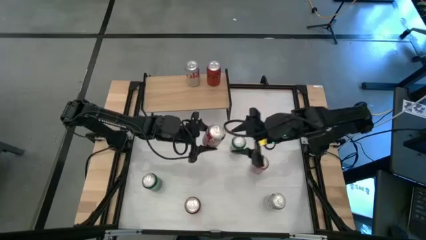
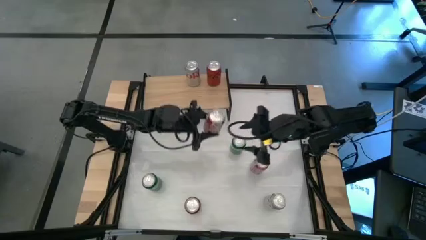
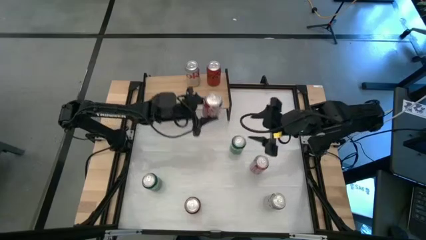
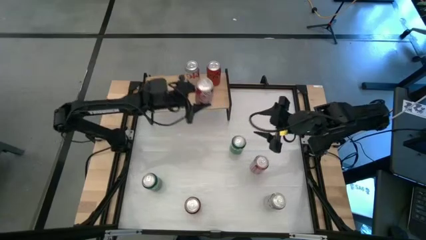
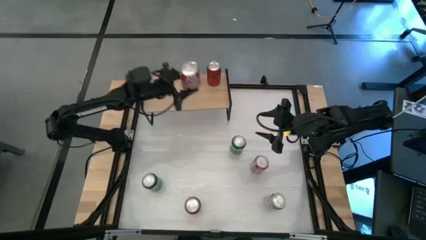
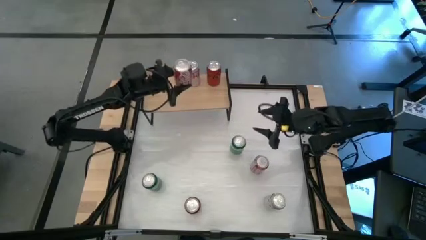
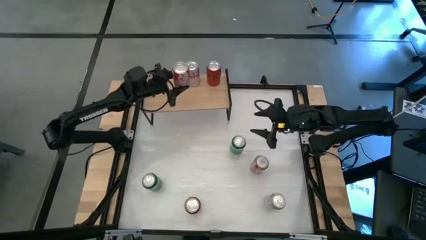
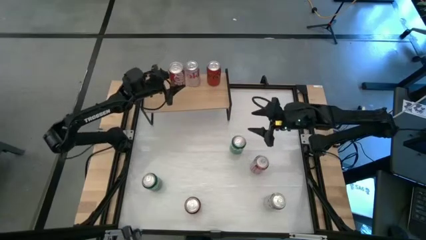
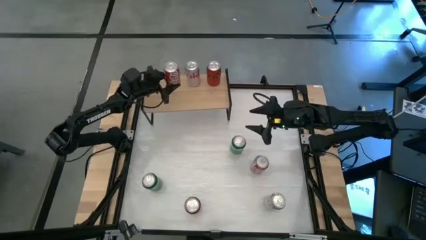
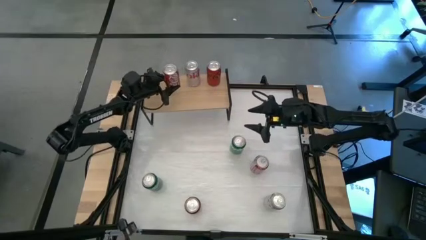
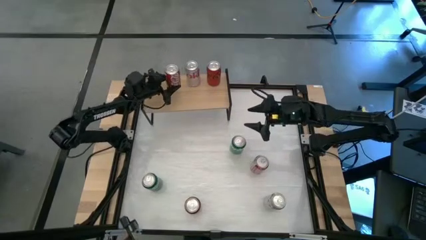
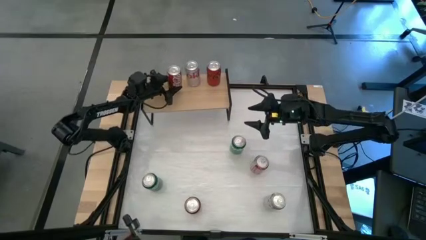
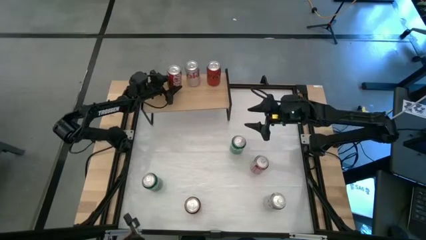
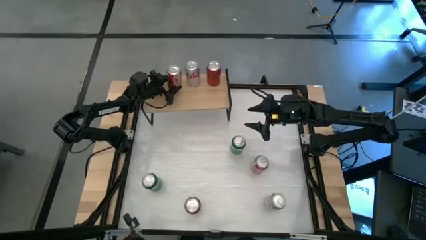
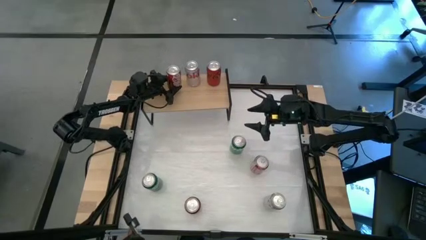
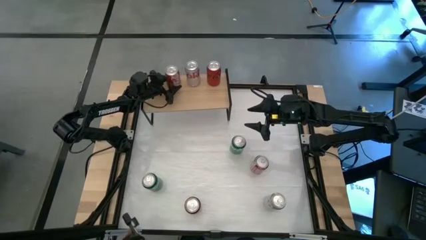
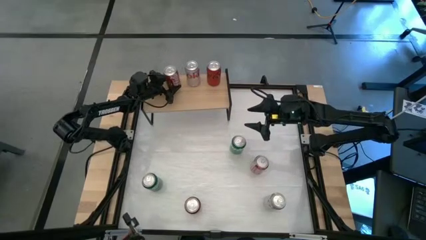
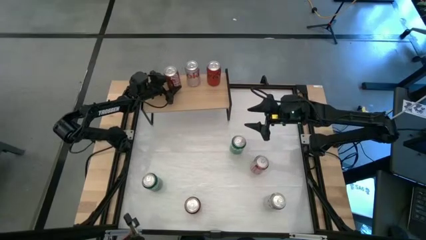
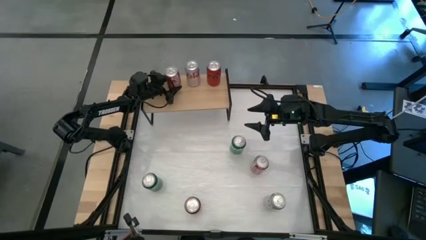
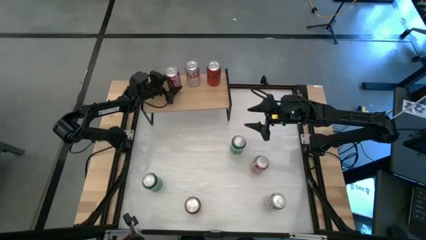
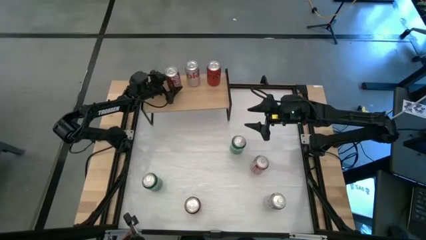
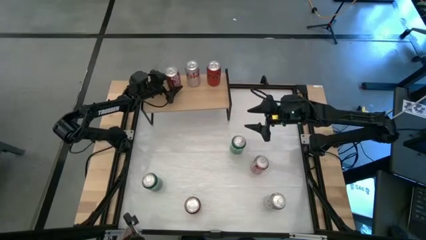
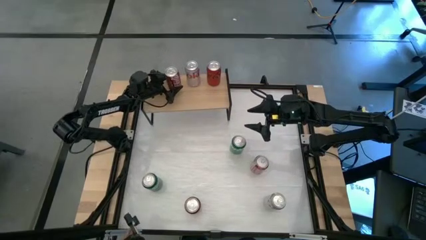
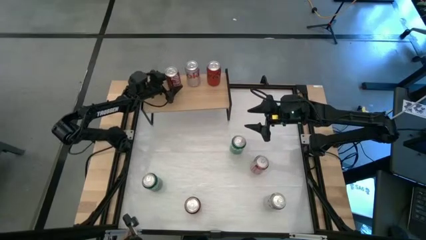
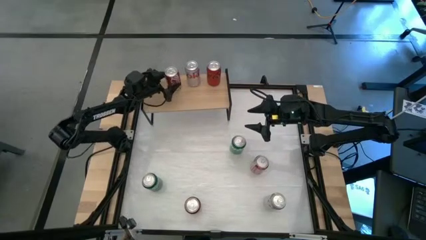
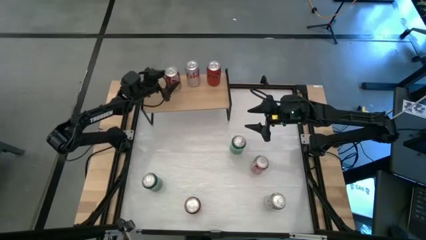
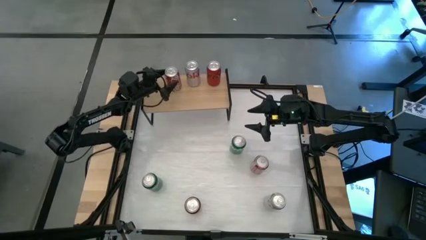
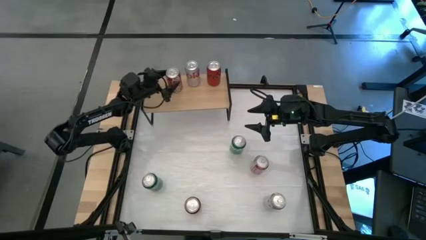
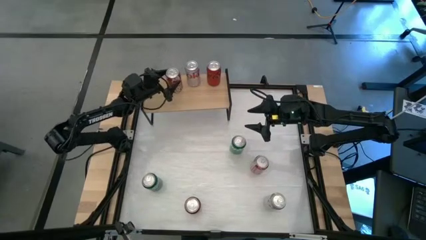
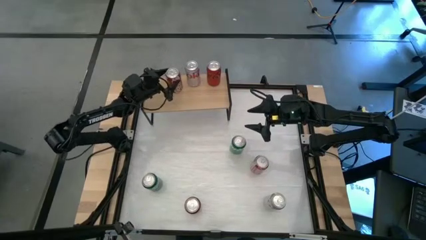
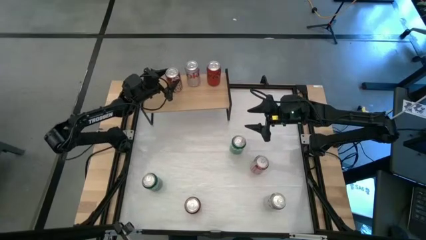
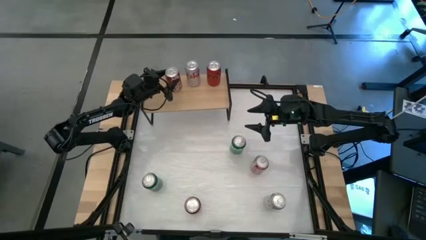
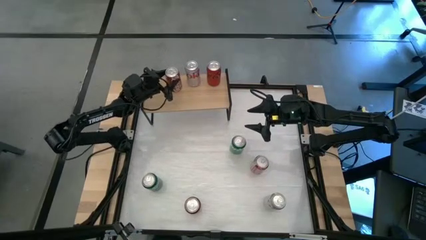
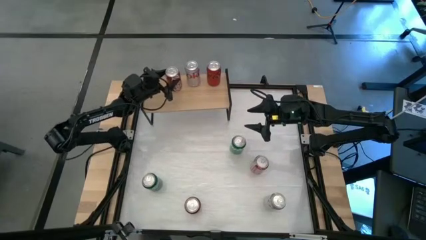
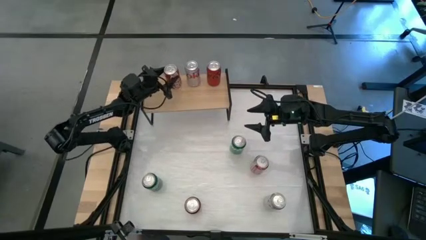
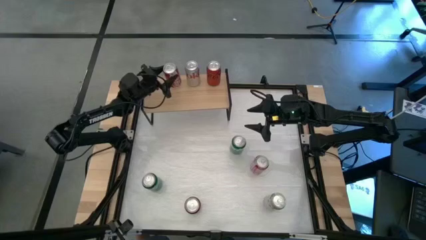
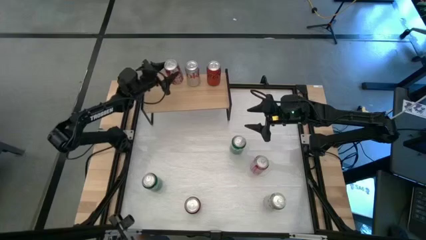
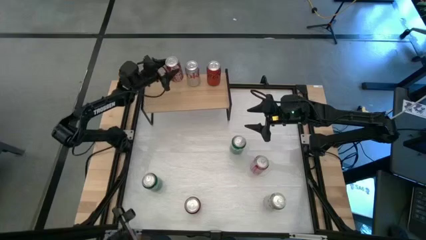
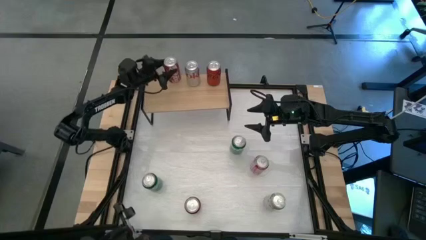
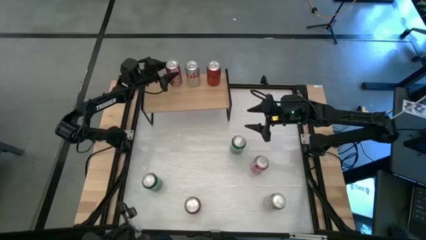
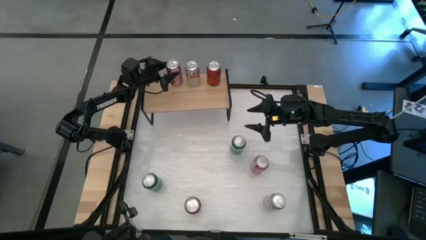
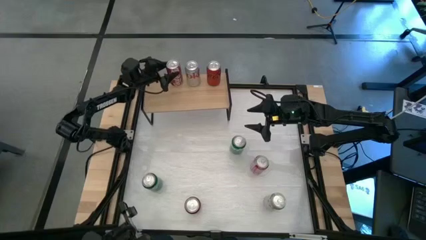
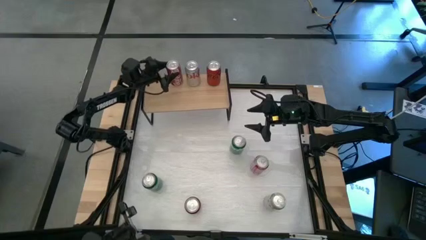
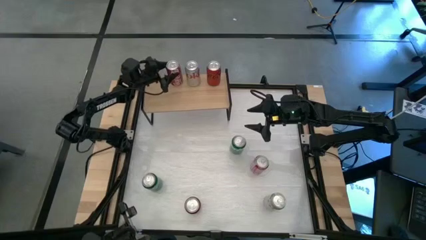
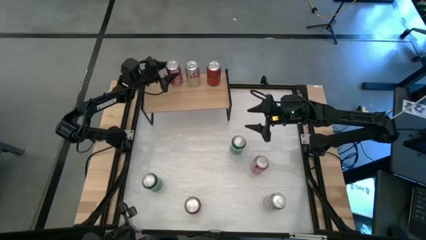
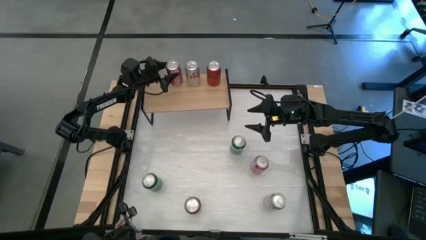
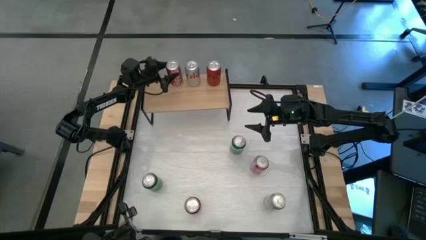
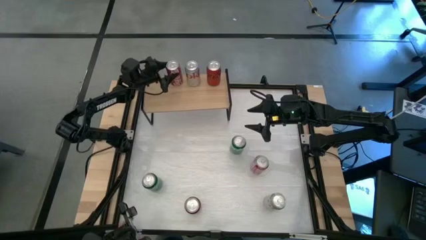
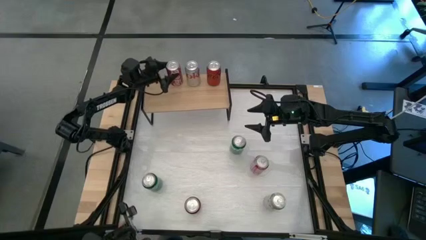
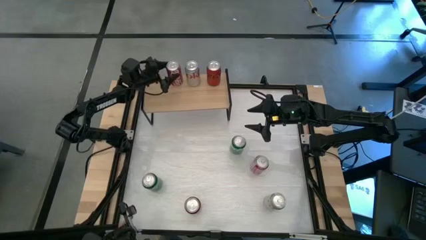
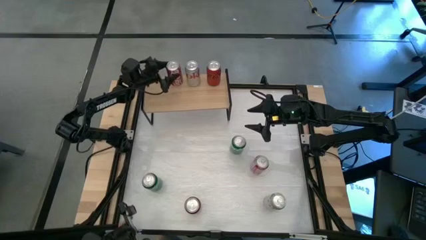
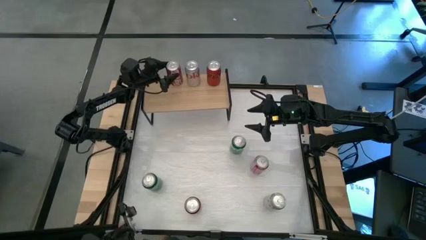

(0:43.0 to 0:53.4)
Task: Place canned beverage on shelf
Put the bottom red white soda can on the shelf
